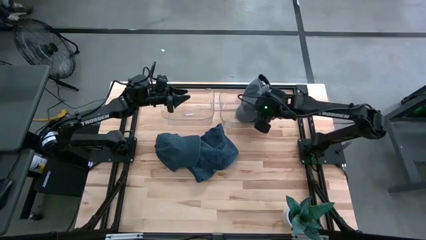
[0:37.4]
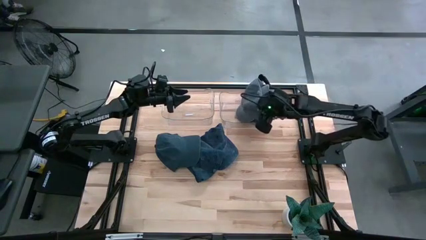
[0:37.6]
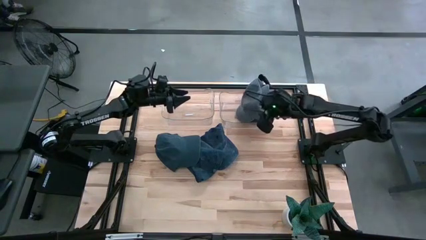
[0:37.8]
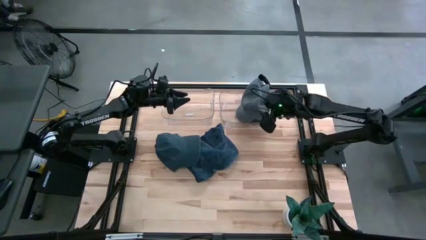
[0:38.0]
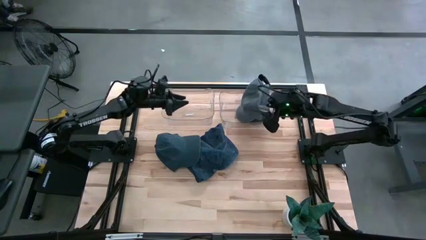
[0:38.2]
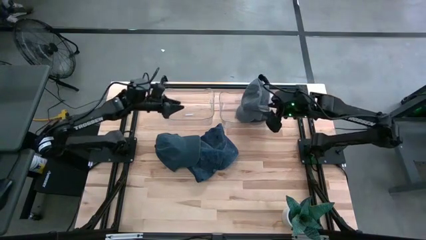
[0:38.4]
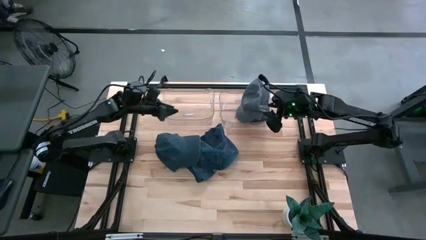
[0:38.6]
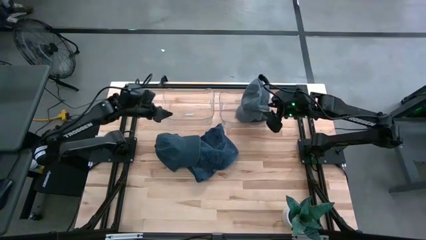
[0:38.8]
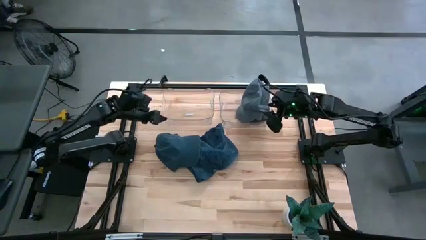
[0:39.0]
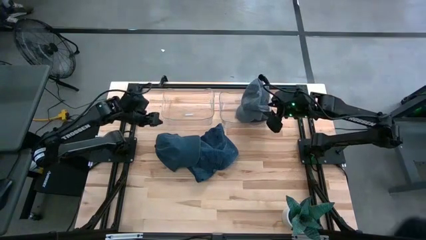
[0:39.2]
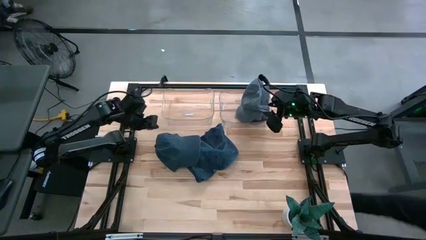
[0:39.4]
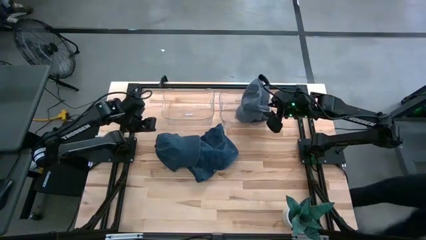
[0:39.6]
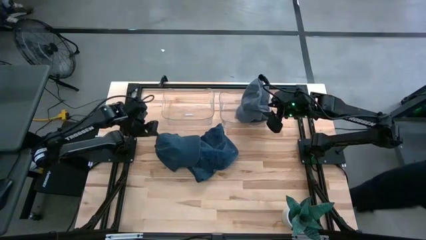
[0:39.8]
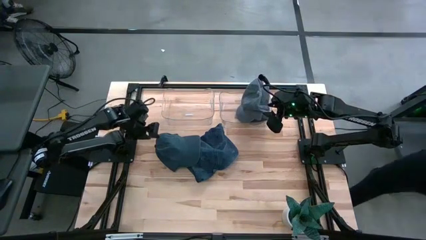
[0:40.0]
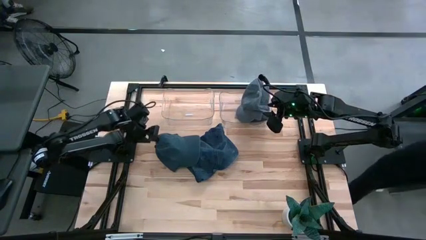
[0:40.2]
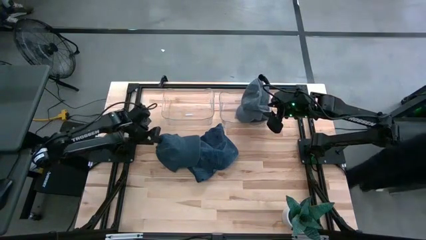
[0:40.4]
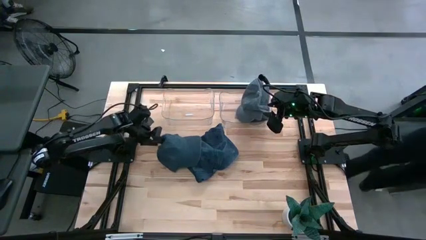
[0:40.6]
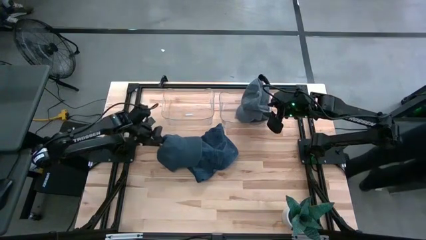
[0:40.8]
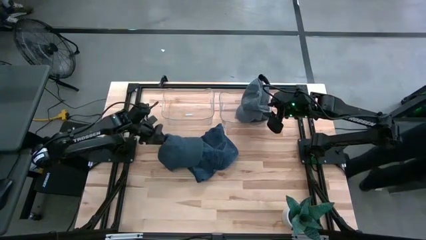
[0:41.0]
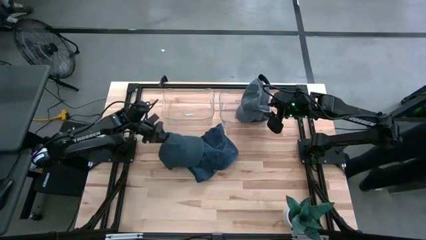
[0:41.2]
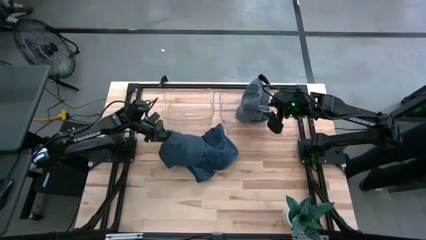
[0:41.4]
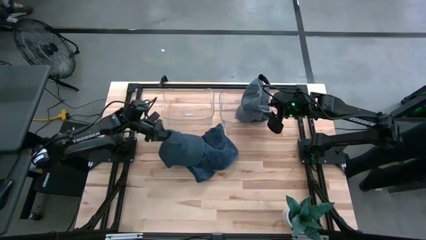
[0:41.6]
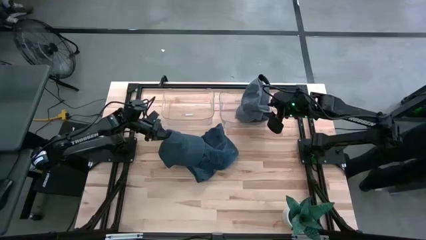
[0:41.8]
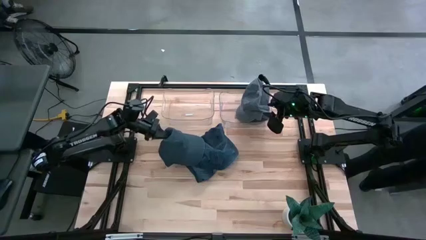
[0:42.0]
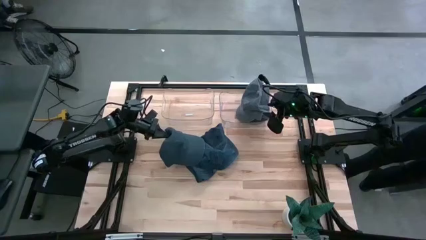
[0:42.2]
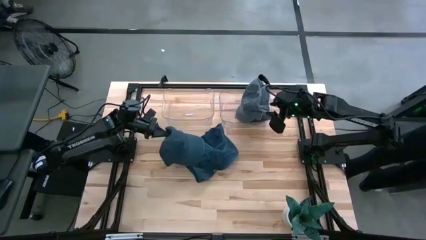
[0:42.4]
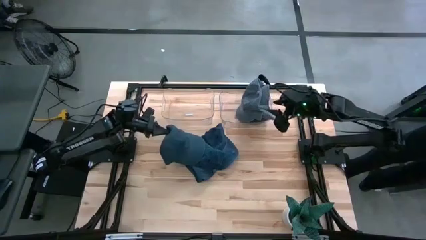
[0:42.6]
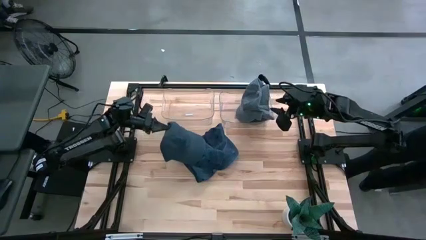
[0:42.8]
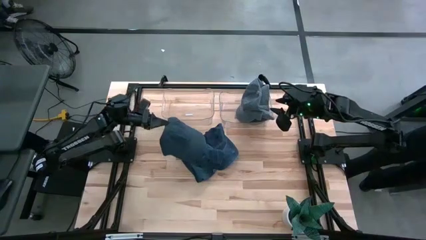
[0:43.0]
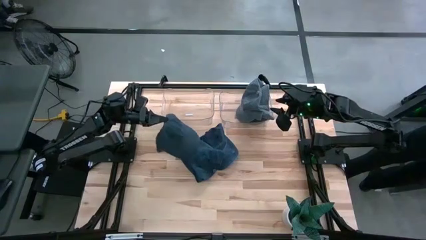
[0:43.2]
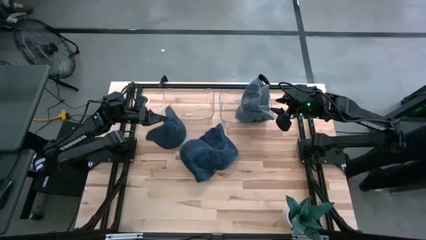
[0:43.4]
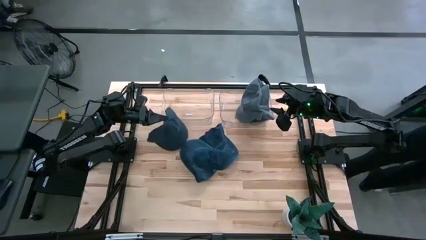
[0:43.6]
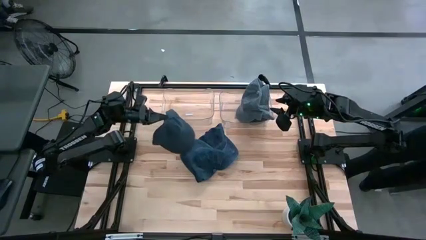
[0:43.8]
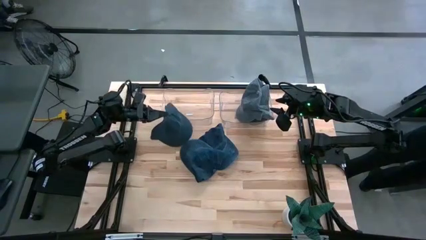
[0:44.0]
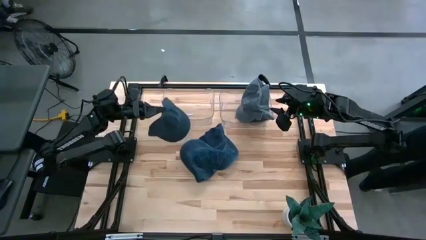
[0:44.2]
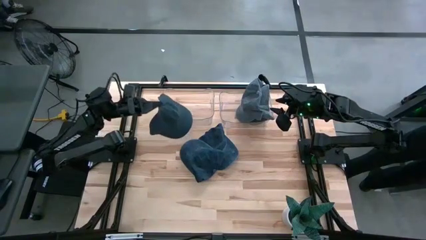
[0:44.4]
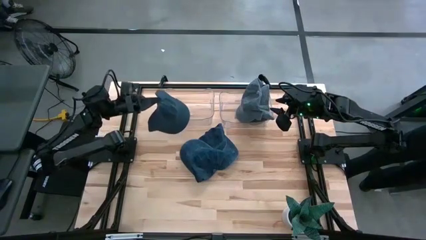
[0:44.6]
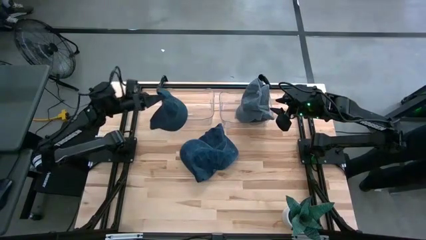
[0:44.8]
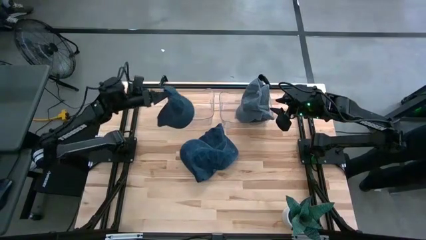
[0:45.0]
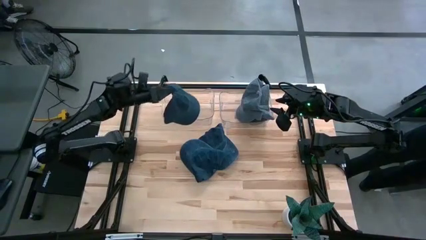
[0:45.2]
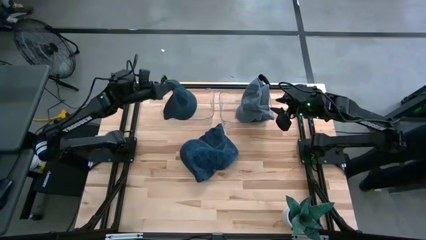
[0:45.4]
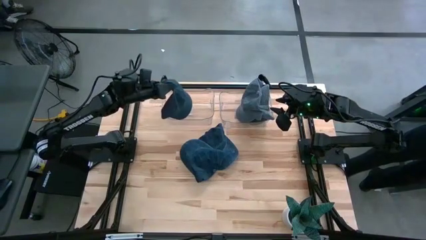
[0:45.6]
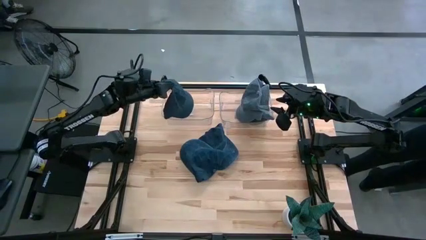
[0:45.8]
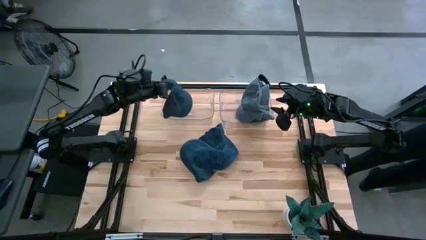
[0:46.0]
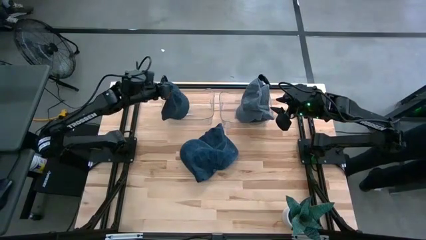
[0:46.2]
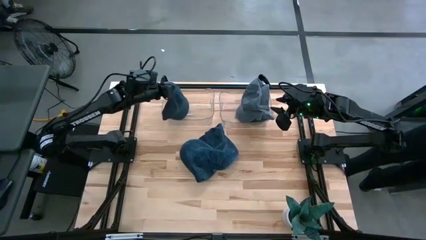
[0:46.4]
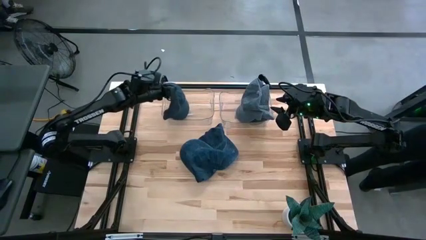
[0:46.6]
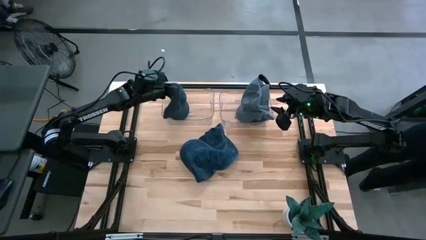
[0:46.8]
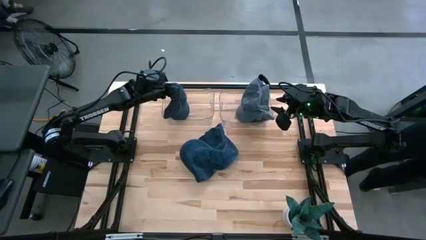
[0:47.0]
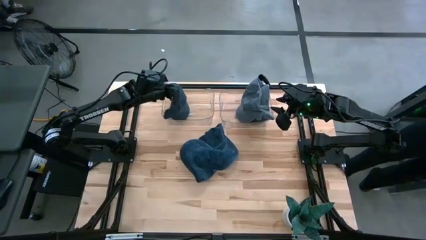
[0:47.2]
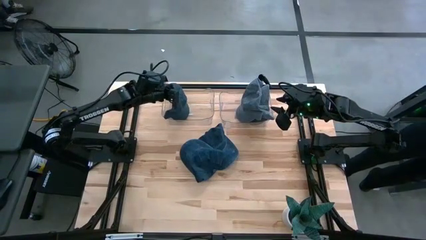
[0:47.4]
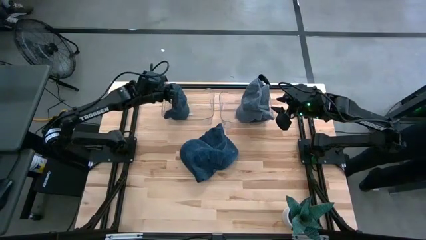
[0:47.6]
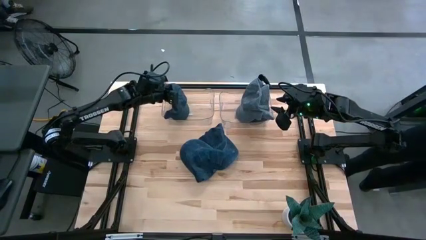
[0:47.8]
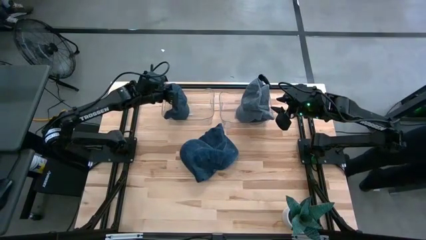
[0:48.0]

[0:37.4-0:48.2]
Task: Pick & Place hat
Put the left blue cap into the left transparent bin

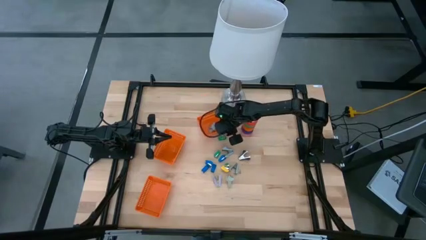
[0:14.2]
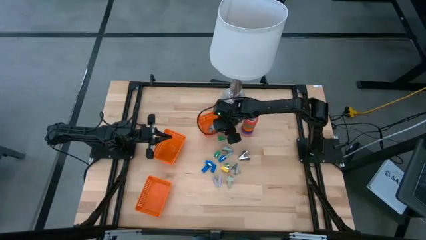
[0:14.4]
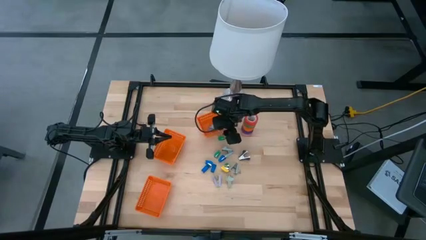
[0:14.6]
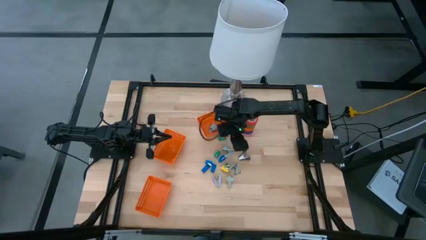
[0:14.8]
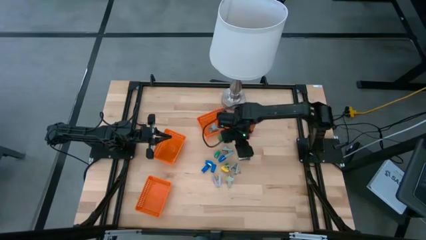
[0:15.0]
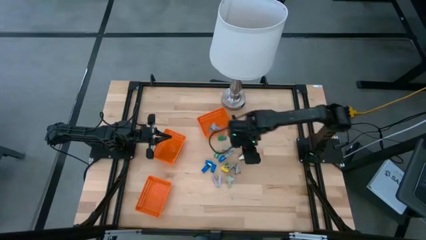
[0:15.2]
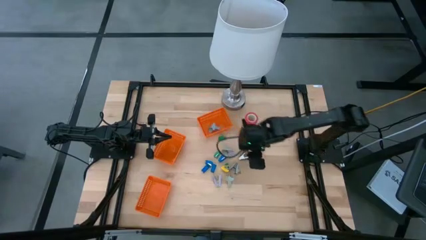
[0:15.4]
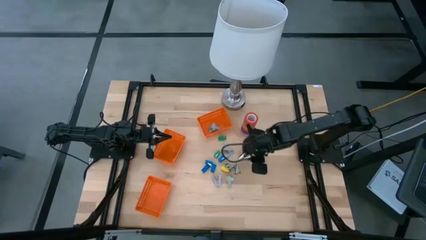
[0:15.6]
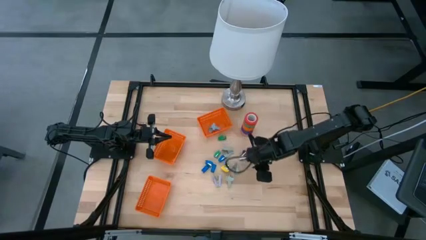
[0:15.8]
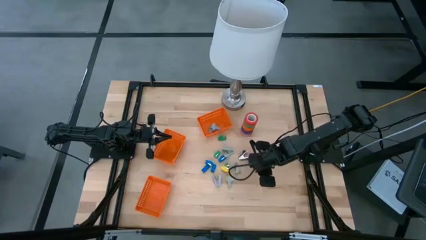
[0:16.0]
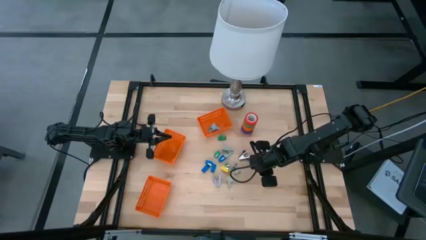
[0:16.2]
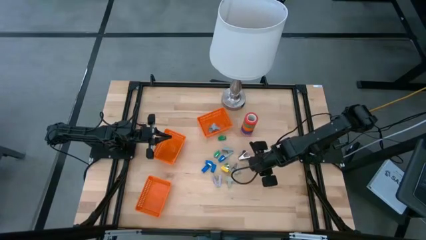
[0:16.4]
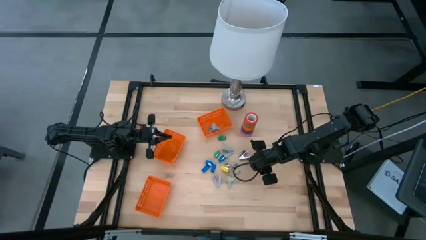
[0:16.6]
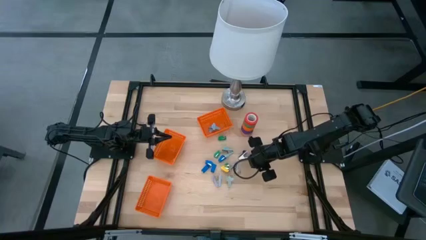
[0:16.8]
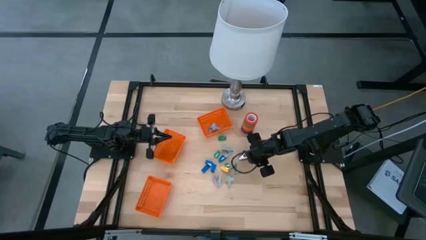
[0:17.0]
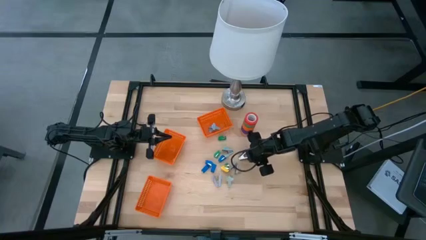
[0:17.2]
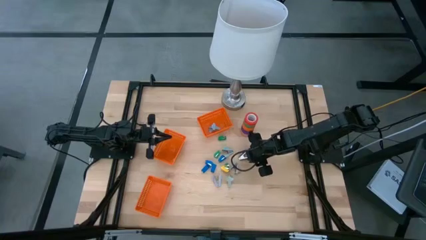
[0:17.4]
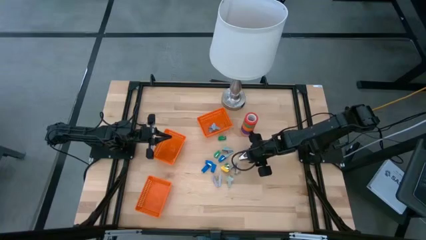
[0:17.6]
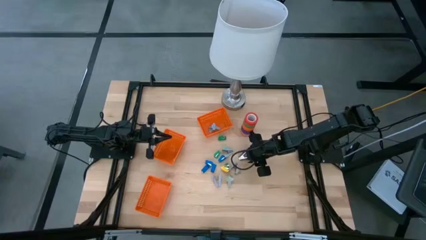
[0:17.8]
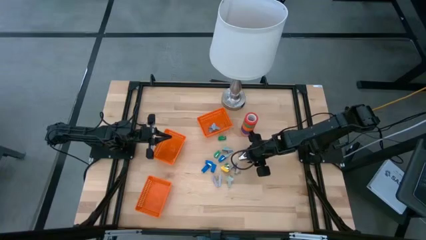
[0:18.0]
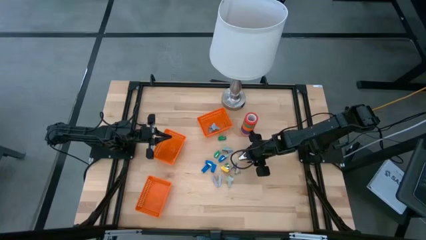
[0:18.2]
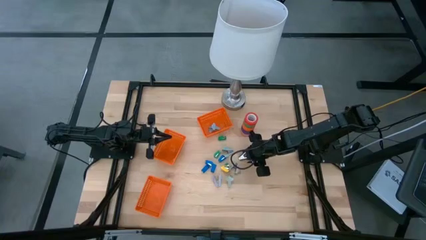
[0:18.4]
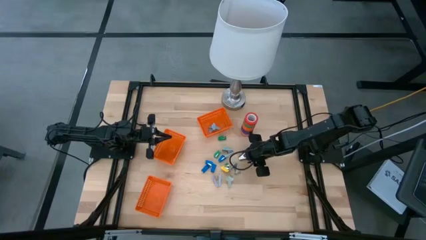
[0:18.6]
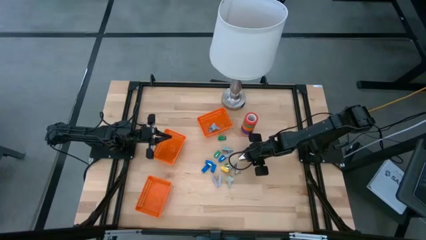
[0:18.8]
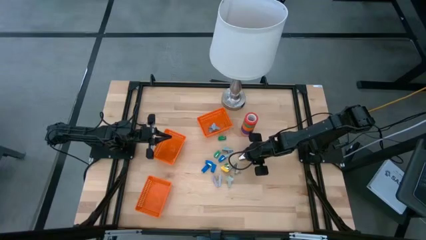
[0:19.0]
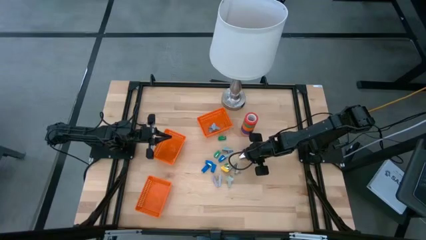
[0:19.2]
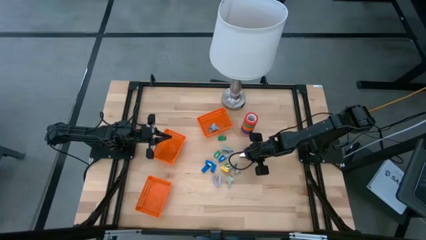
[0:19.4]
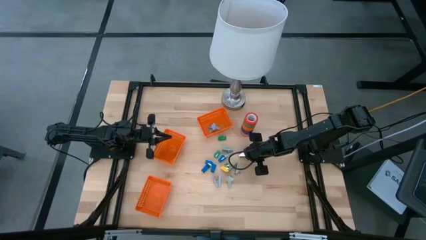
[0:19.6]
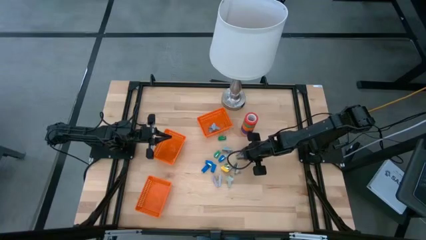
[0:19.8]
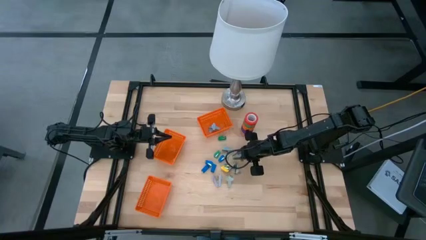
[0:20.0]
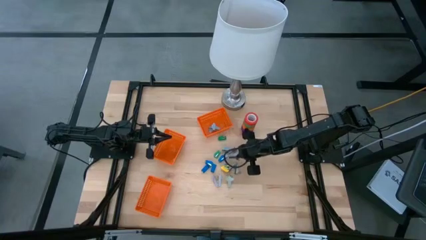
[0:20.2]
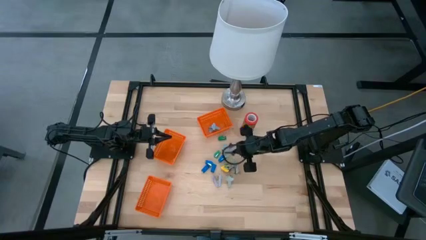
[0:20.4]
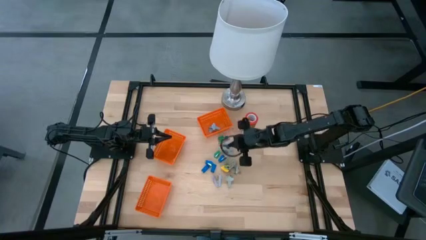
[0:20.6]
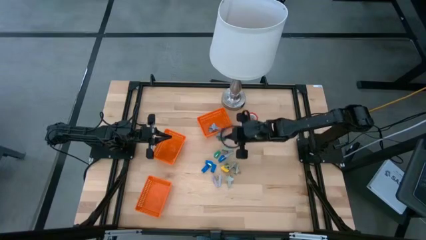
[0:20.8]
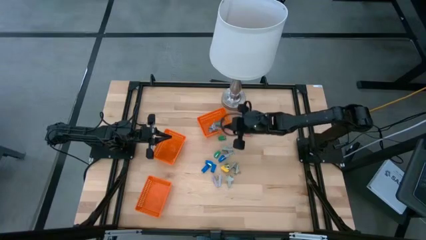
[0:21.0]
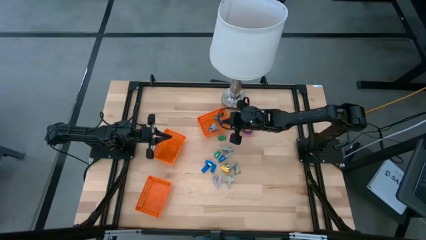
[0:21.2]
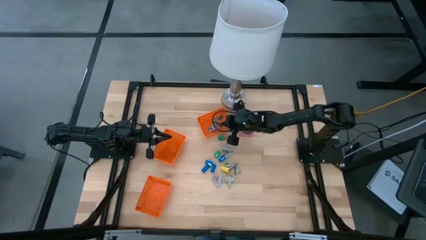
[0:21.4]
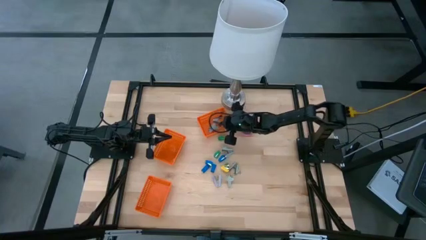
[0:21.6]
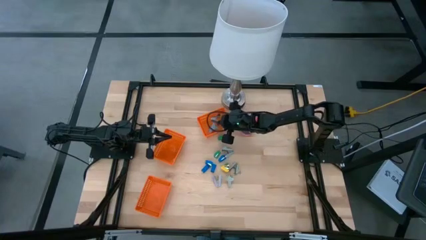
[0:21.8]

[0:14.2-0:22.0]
Task: Pick and place Stapler, Stapler remover, tape
Put the black staple remover into the top orange bin
